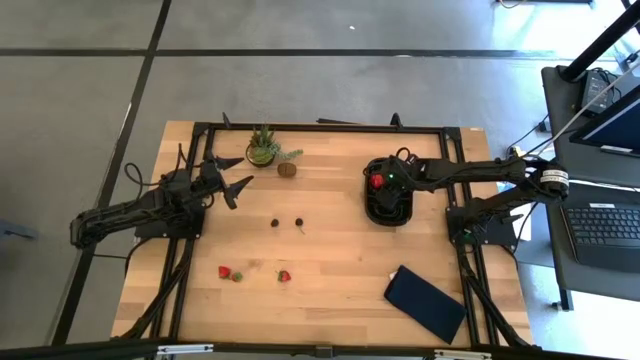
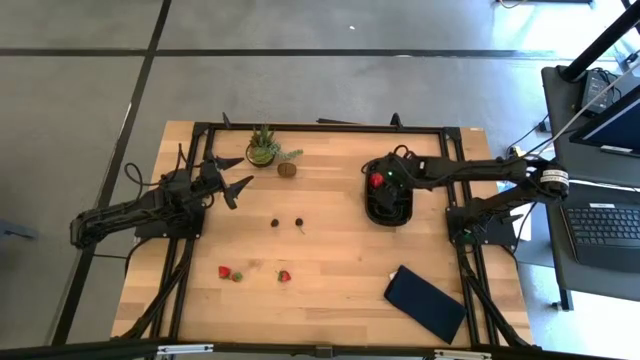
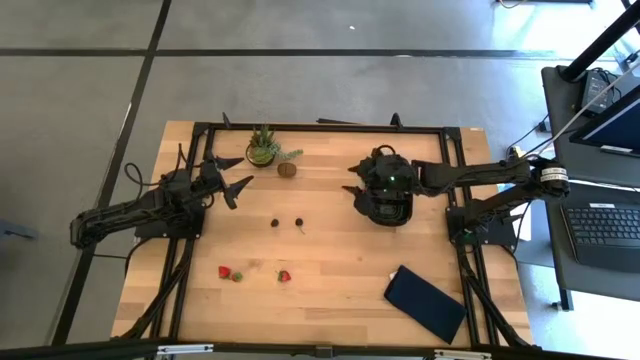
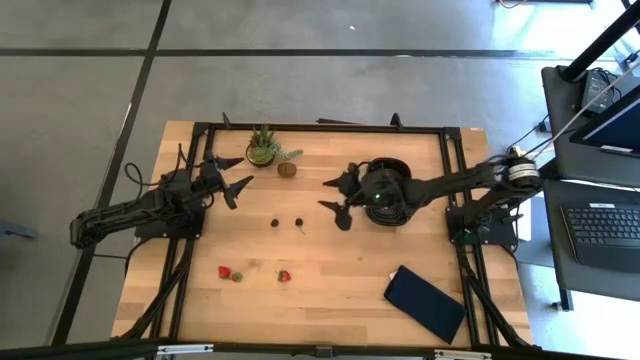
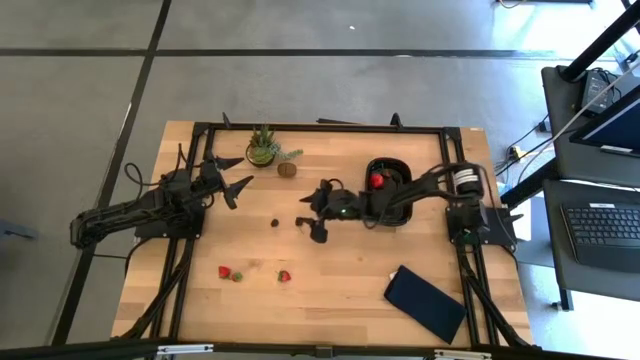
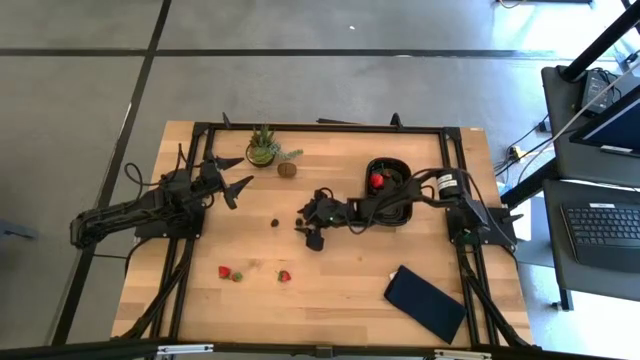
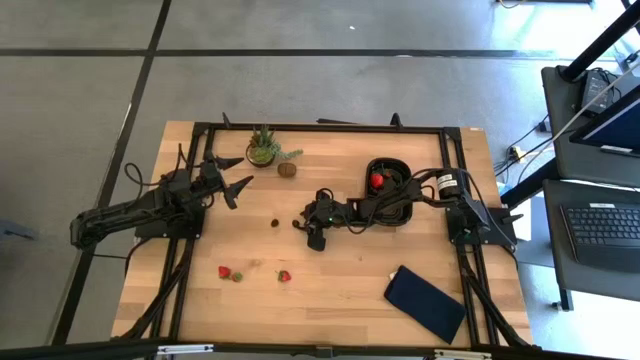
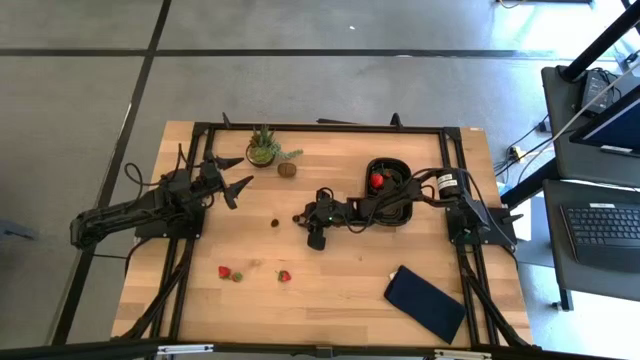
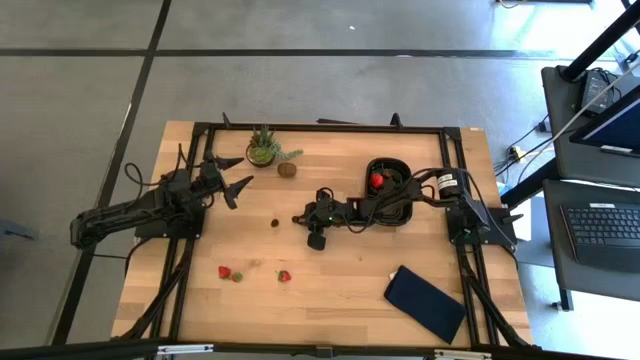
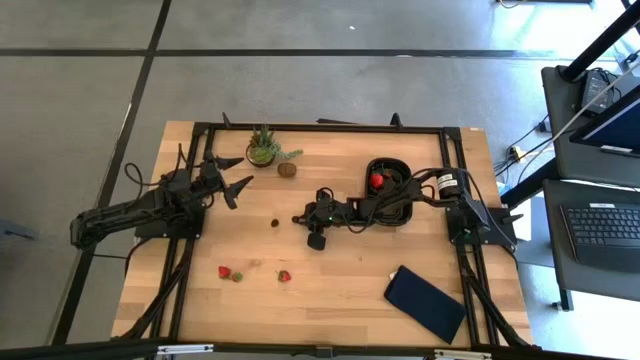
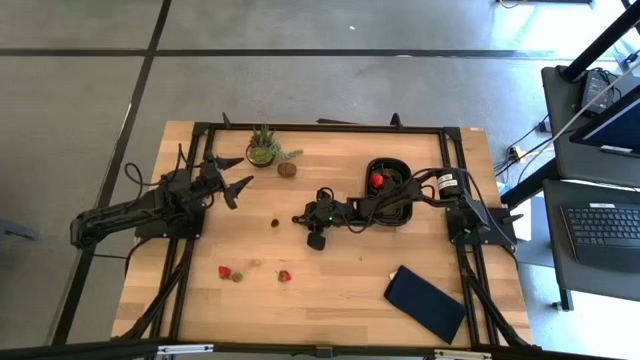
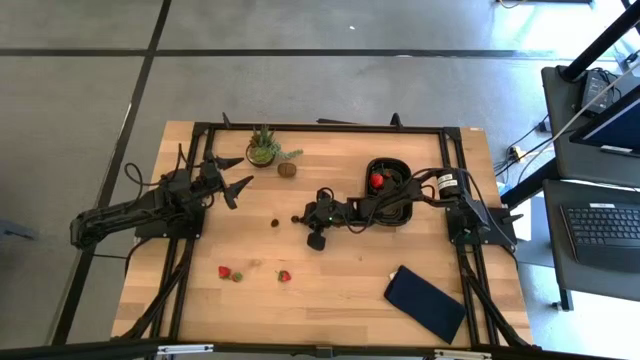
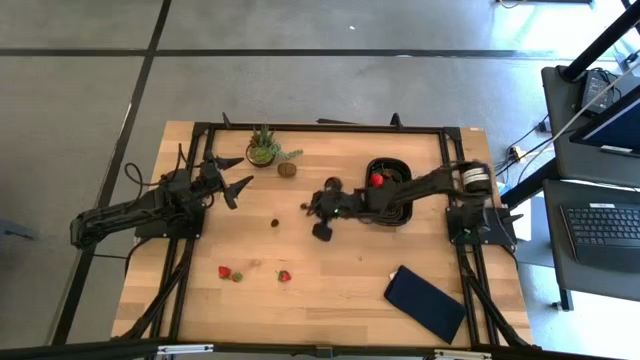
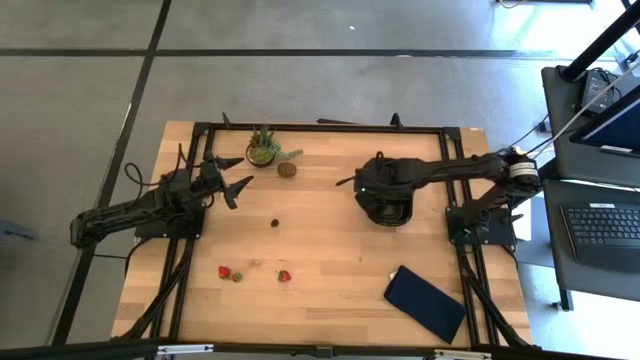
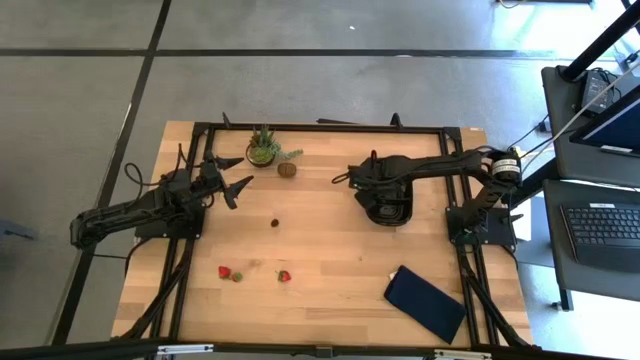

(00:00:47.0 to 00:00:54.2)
Task: Pick and placing Produce into tupperware
Put the black cherry into the black bin

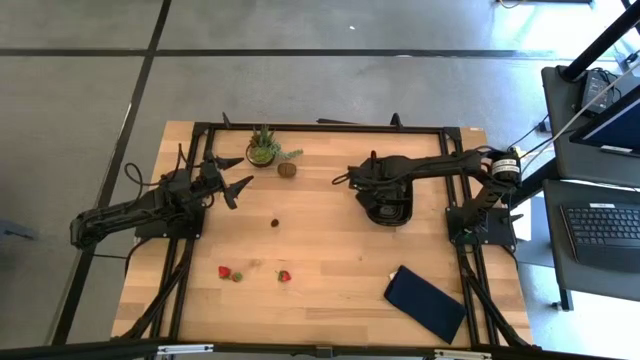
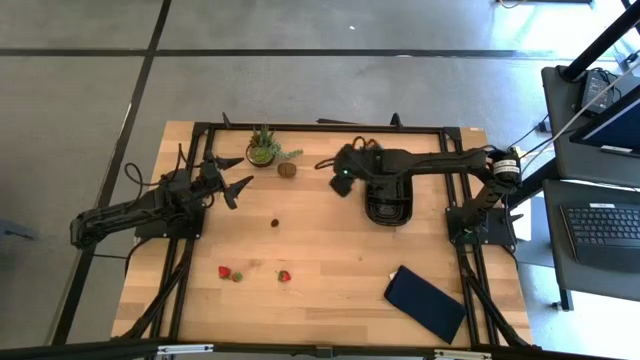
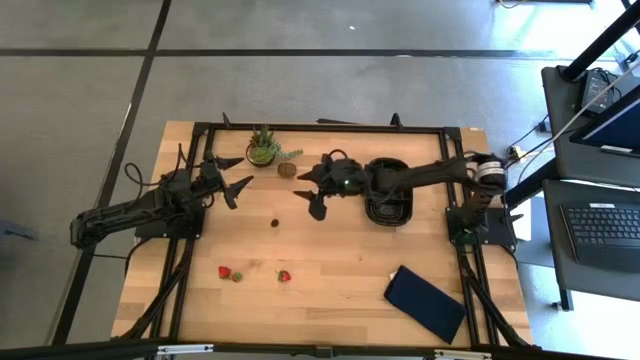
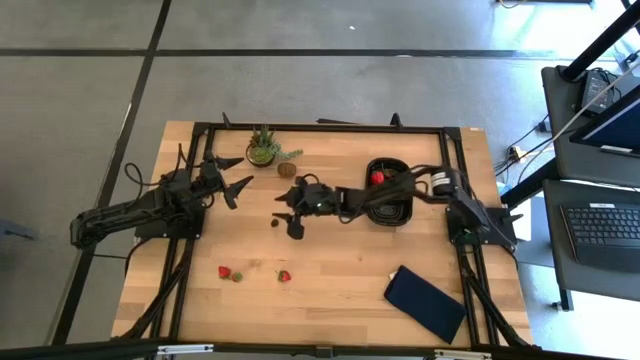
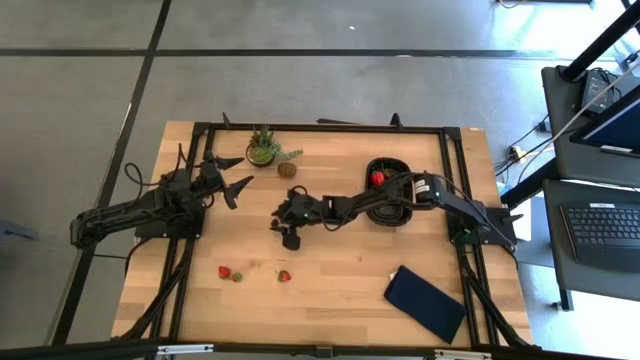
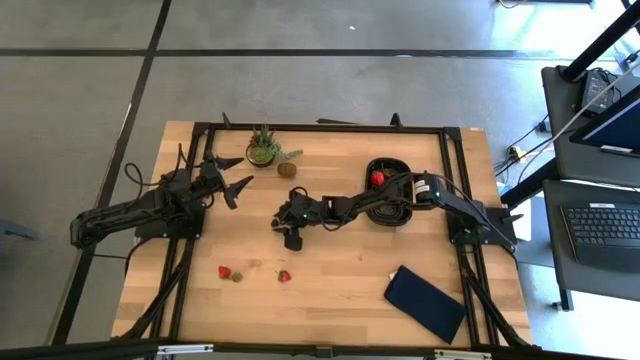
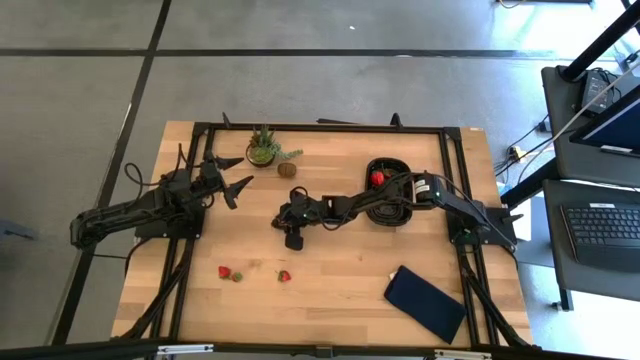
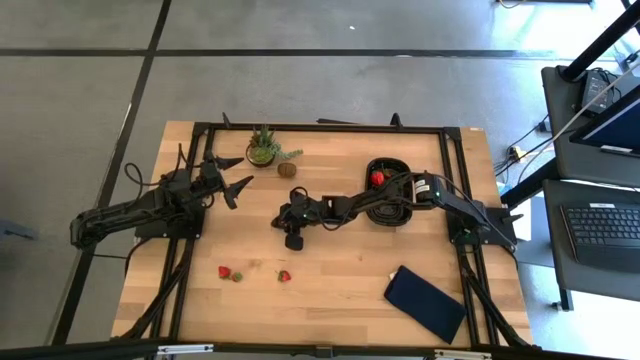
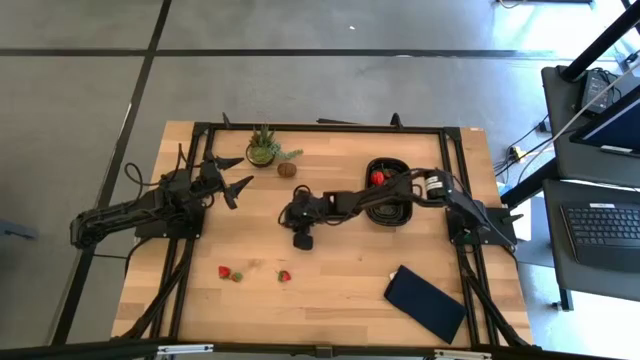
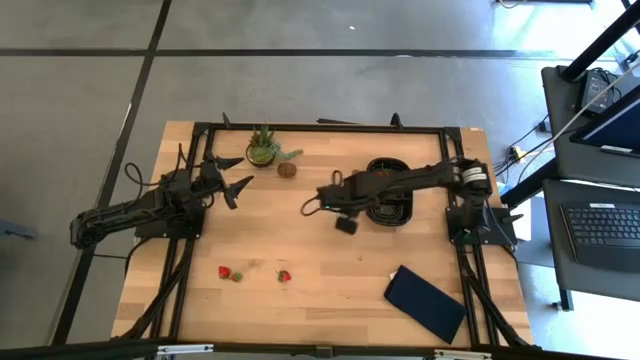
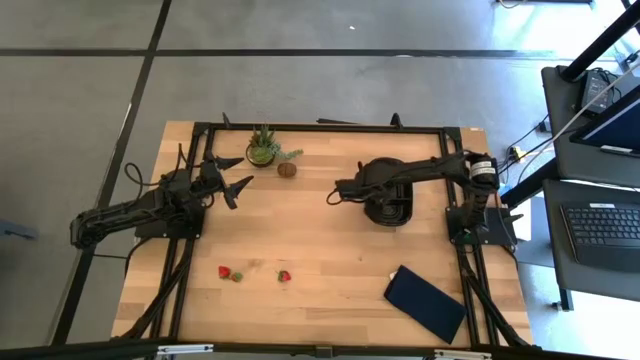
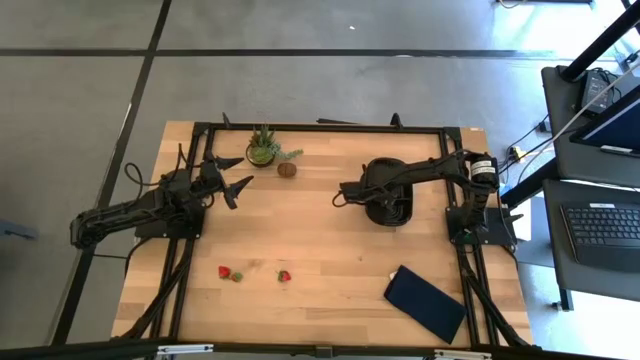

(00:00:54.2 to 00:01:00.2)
Put the blackberry into the black bin

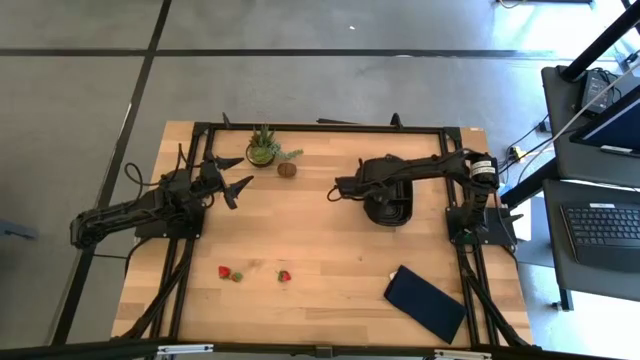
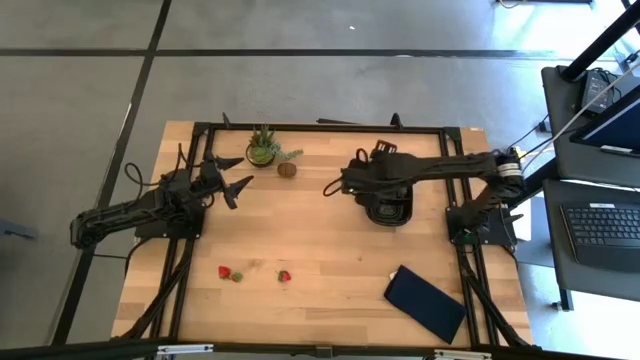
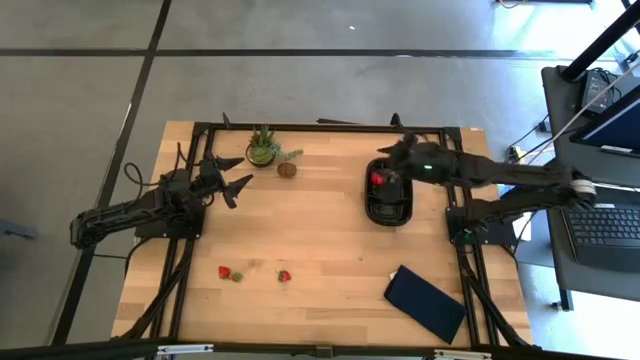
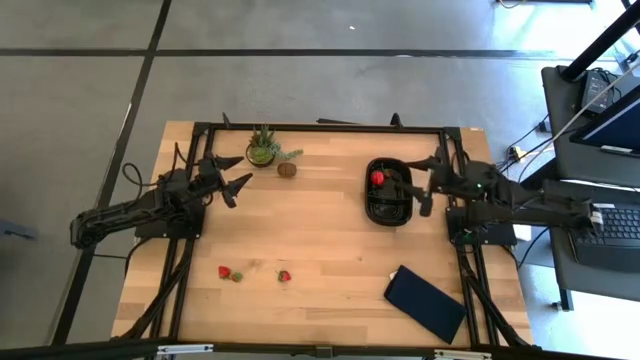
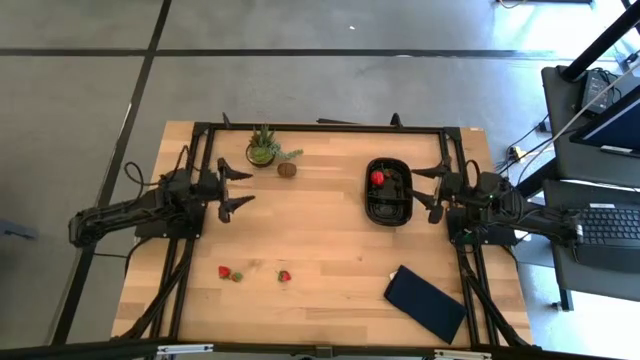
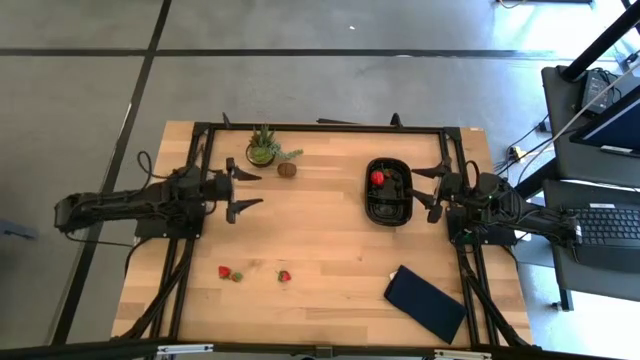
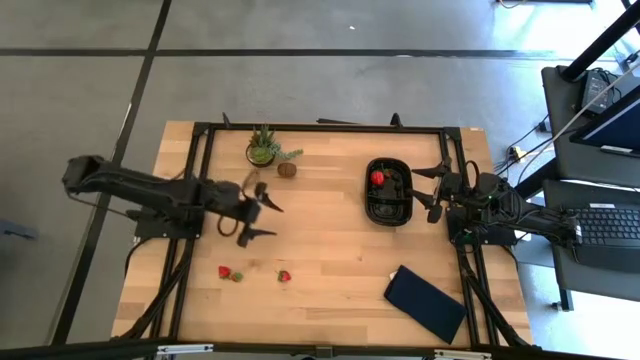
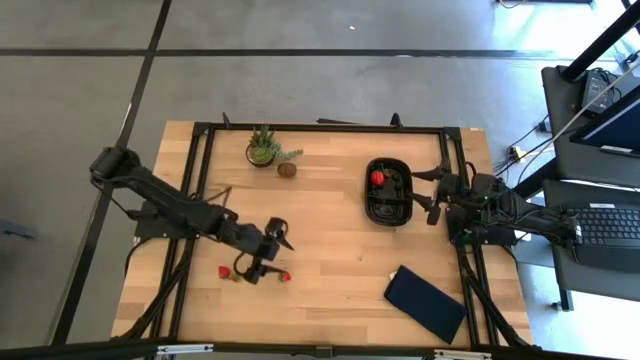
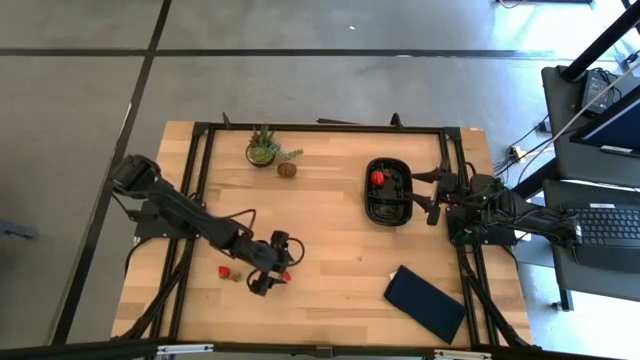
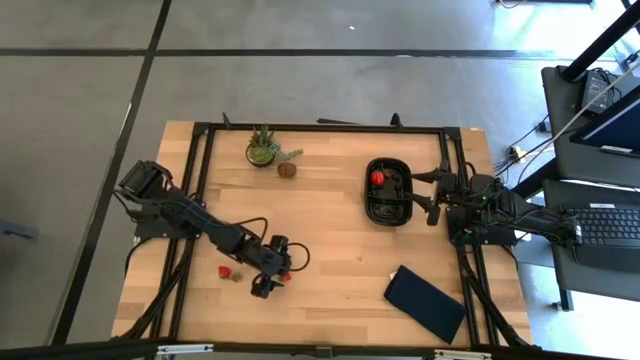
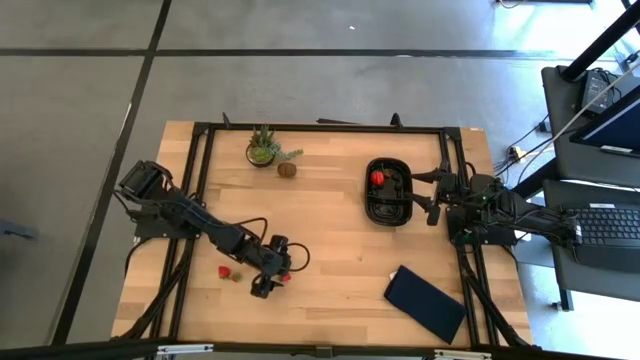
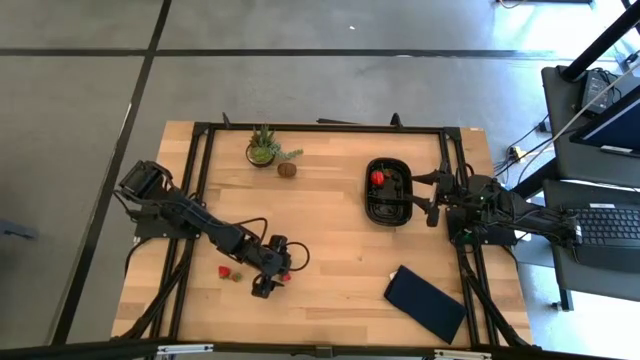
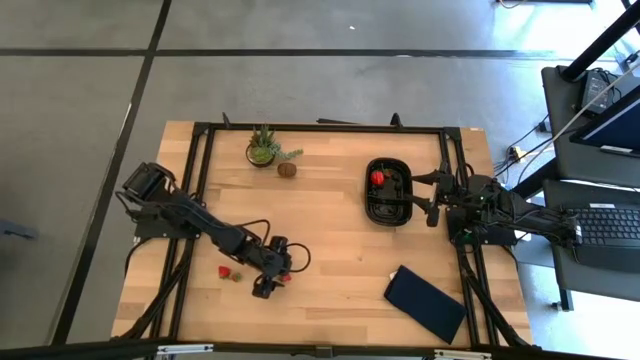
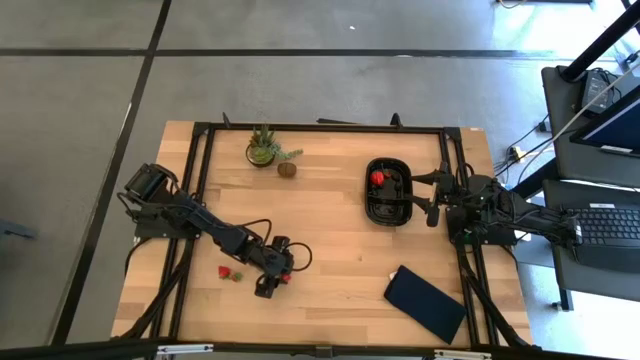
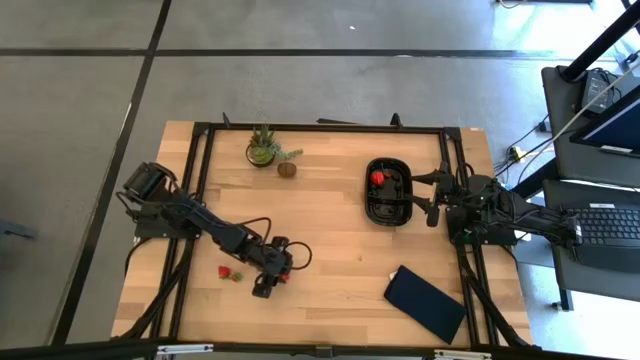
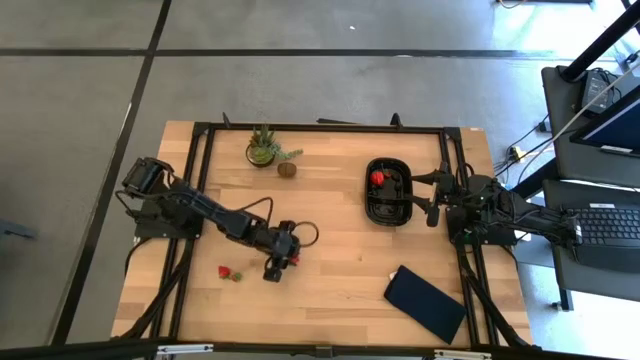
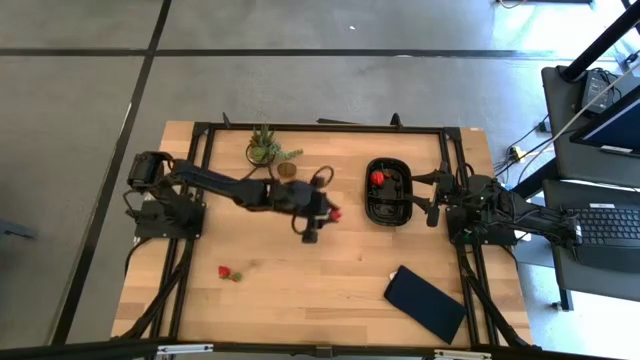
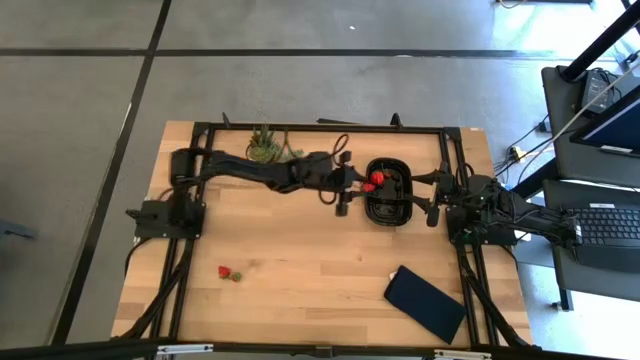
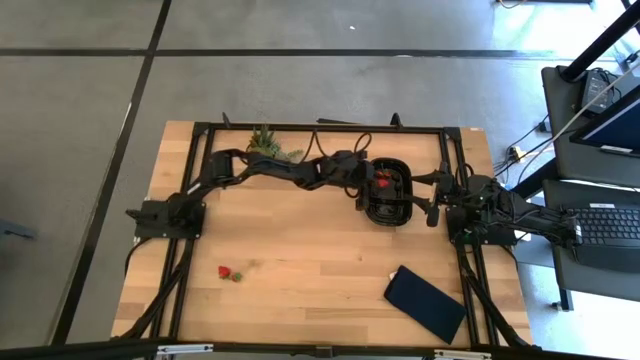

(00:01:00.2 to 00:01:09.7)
Put the red strawberry into the black bin
